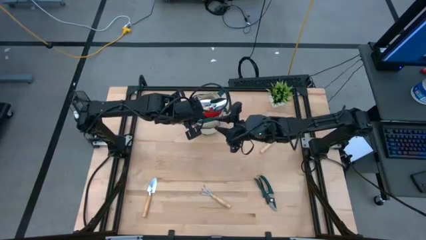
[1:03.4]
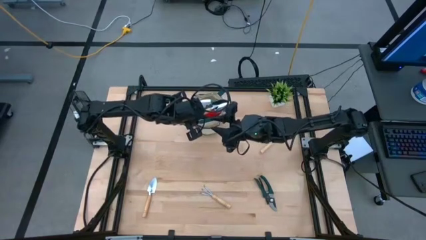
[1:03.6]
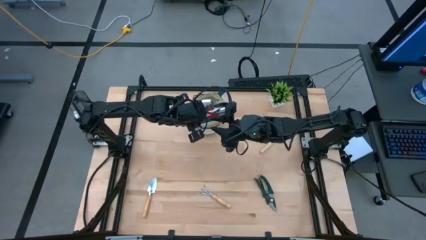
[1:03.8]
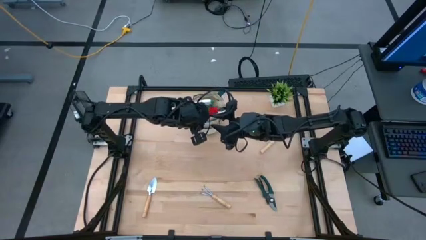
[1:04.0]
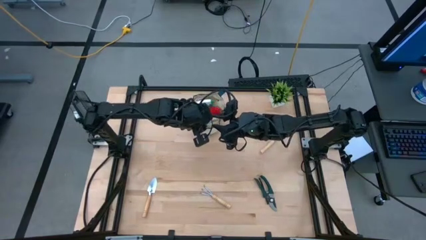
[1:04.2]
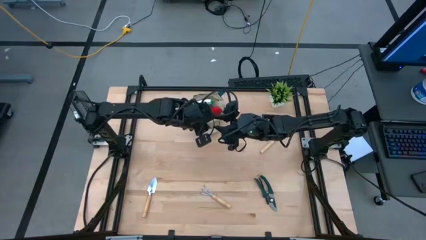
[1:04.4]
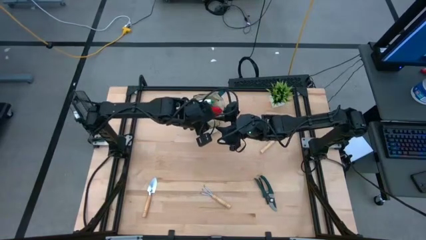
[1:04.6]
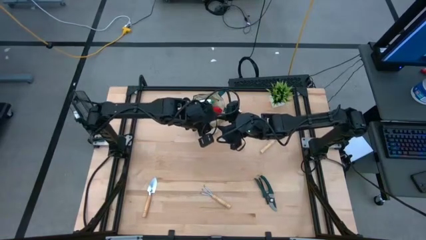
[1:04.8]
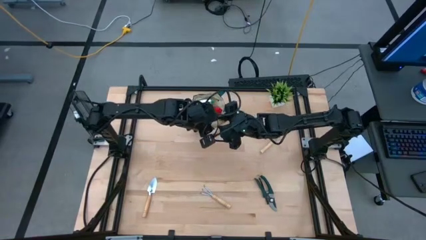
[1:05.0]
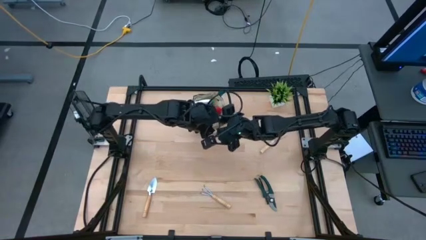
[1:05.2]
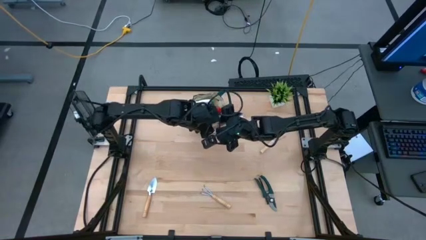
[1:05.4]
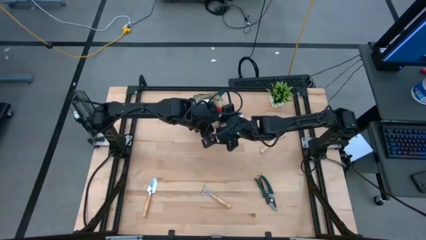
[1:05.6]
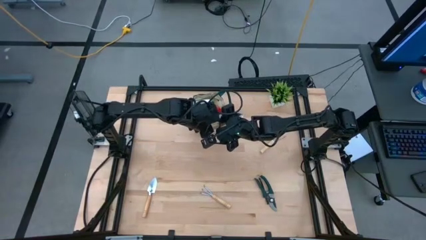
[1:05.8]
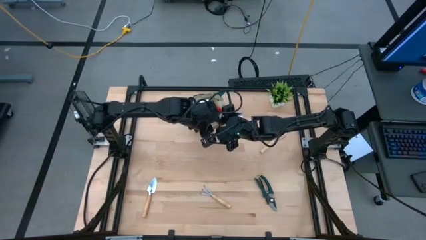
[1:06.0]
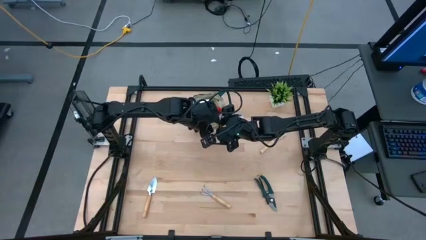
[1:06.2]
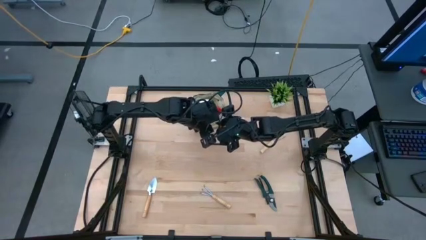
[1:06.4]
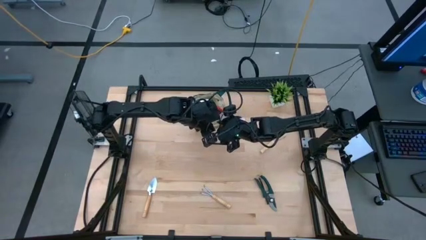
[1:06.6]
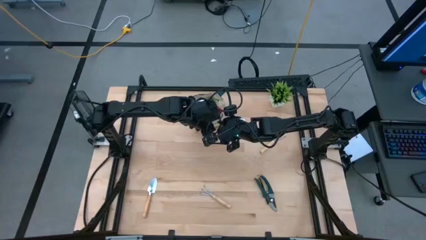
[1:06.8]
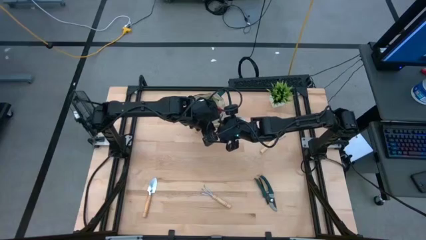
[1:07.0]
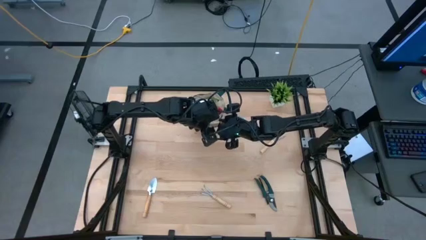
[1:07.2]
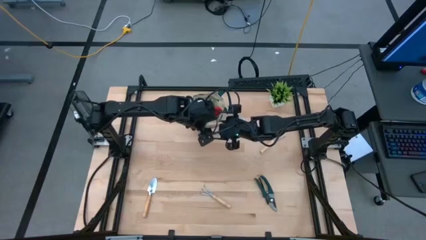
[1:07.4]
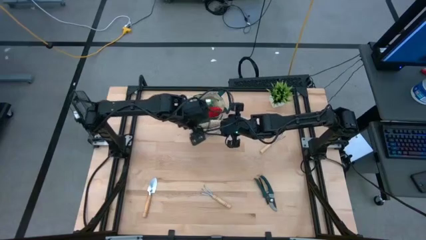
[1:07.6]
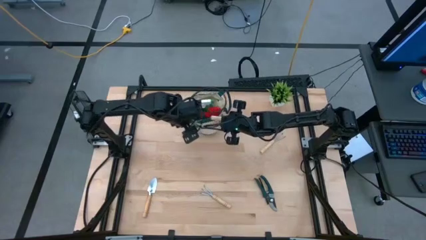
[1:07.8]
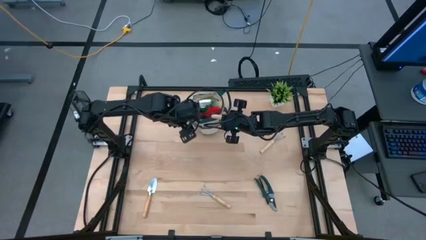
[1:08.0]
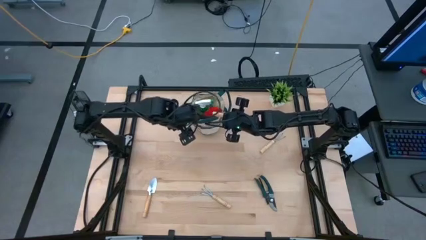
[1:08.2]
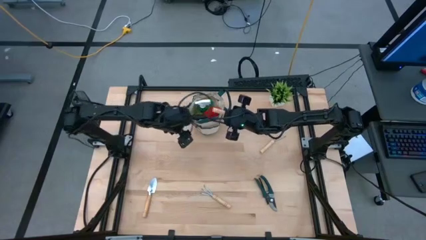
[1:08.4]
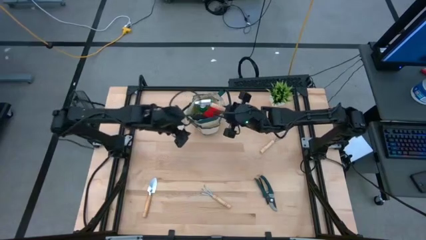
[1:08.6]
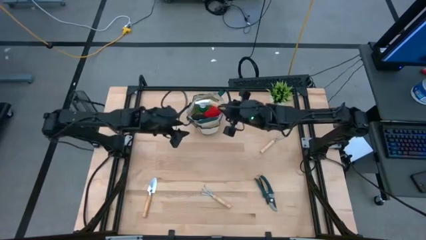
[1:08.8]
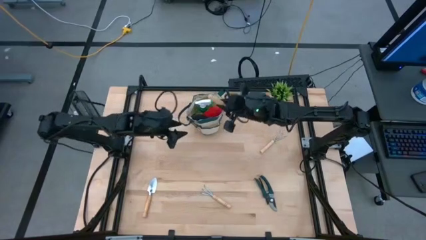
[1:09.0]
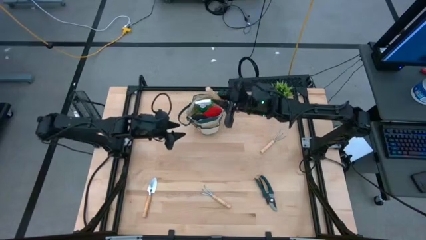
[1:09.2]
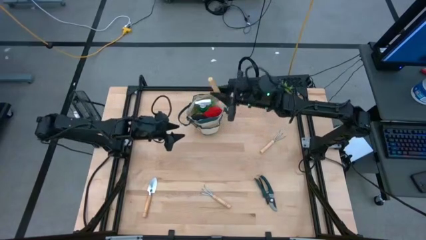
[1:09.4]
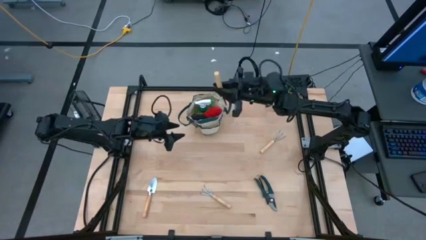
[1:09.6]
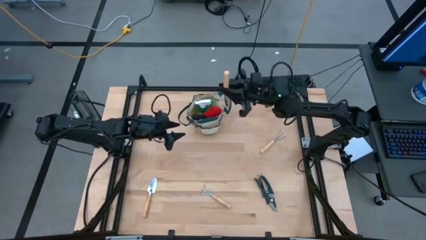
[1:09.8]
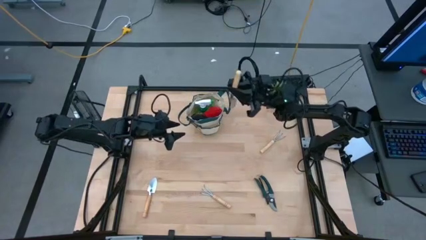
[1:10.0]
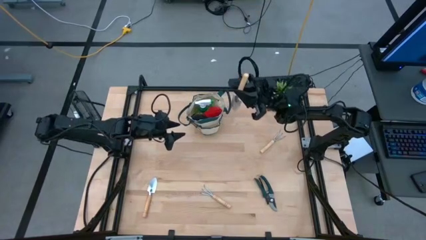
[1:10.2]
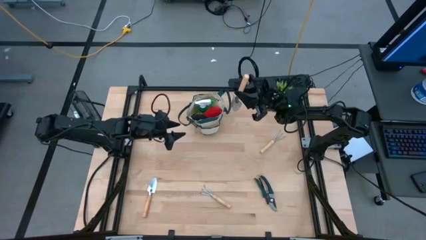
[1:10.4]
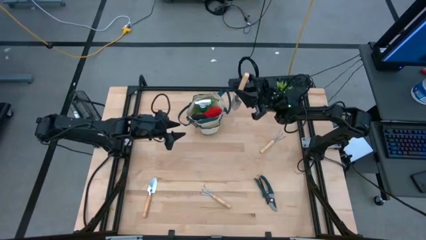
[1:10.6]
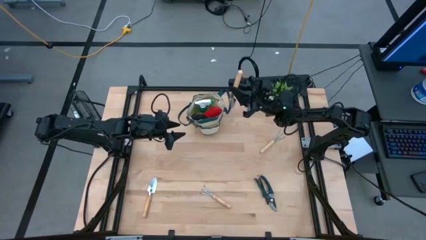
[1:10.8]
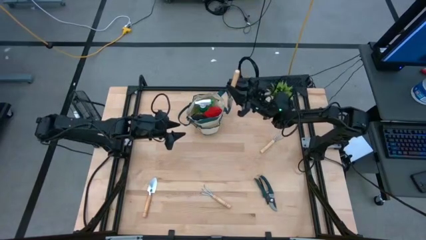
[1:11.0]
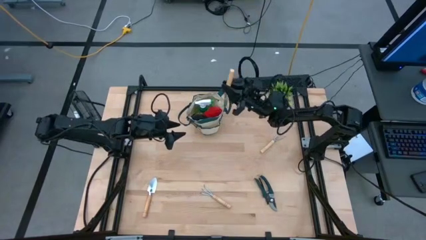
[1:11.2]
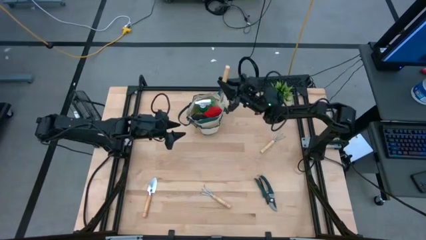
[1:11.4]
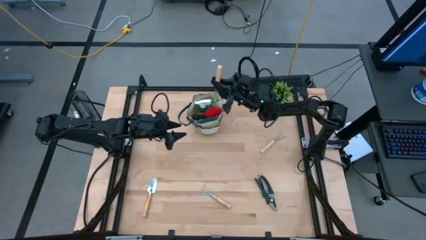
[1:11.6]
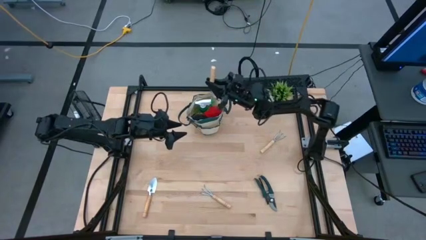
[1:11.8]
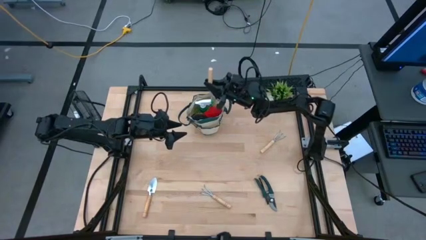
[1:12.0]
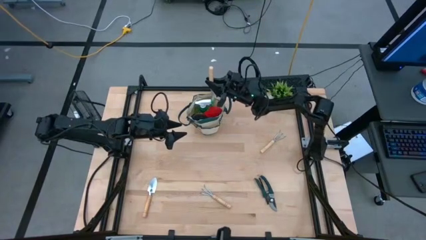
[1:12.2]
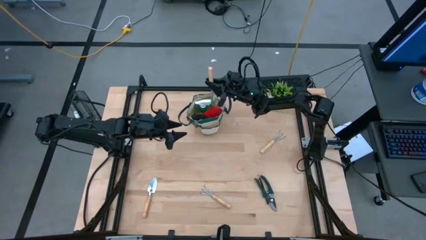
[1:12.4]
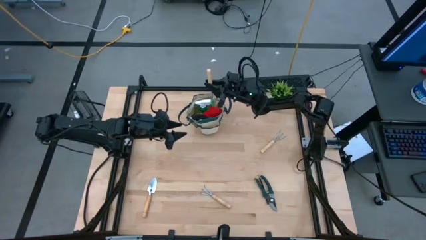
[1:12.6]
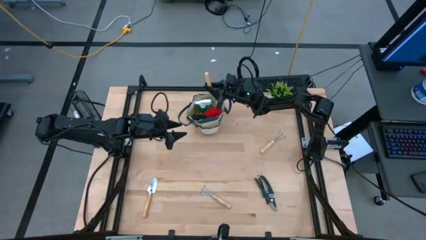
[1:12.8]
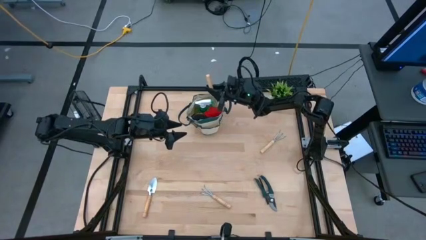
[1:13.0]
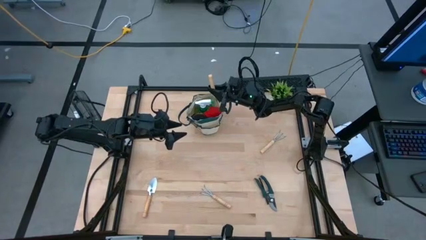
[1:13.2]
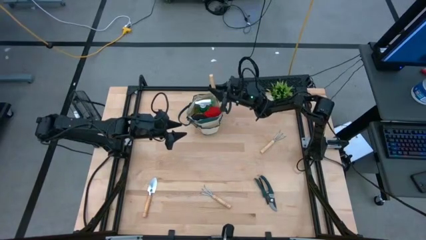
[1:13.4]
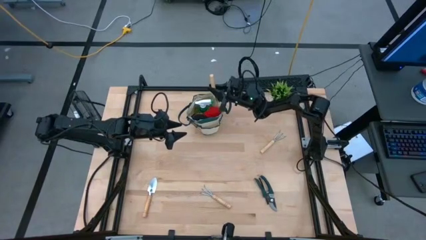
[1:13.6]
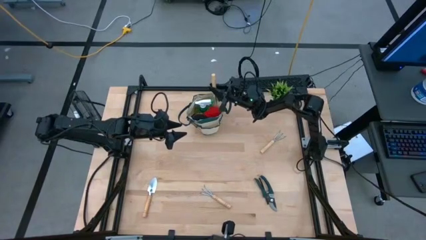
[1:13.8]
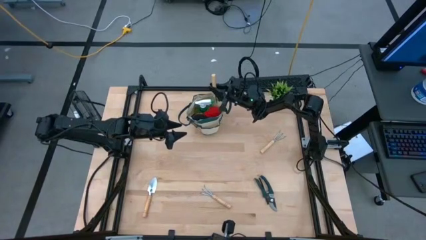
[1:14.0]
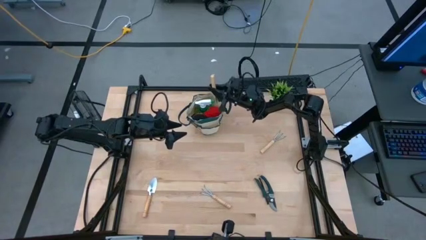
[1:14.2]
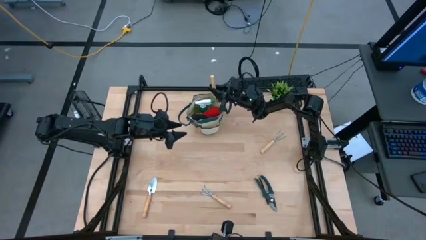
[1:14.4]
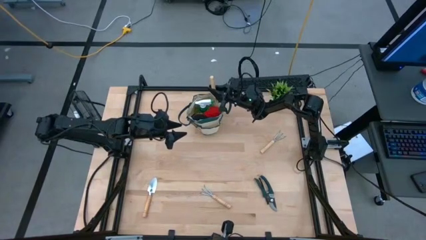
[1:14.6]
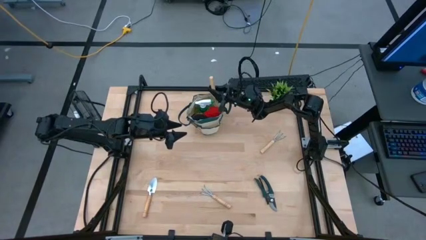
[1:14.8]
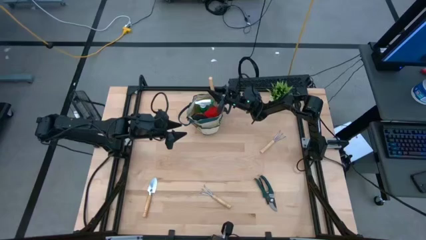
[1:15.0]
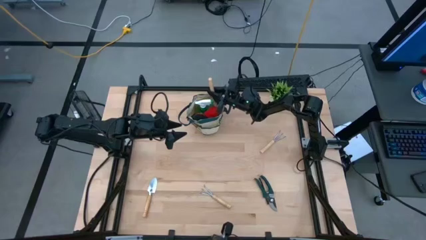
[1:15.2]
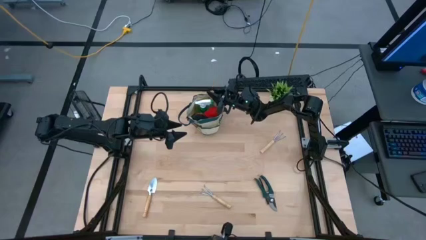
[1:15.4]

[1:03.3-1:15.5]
Task: Pick & Place Garden tools in Gardening bag
Put the top trowel into the gardening bag

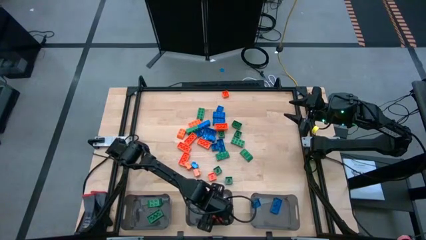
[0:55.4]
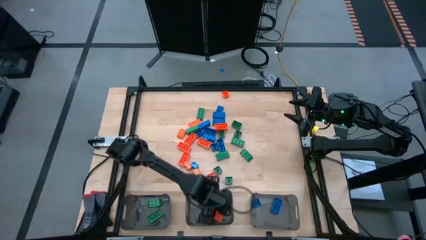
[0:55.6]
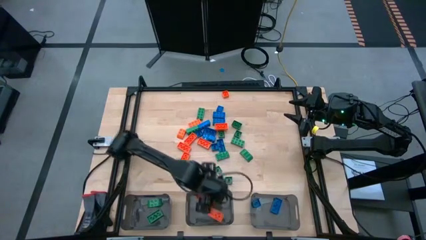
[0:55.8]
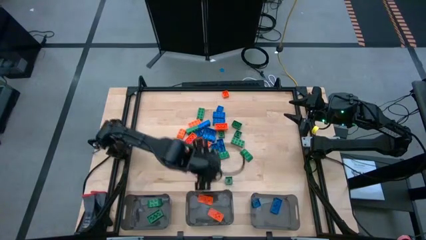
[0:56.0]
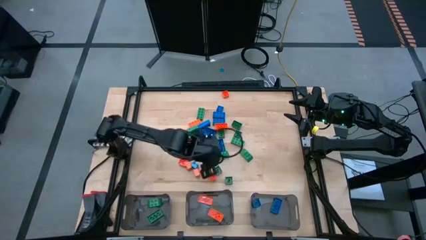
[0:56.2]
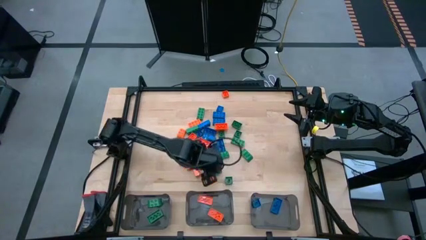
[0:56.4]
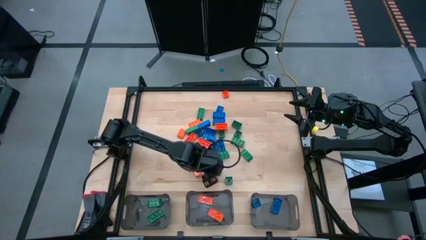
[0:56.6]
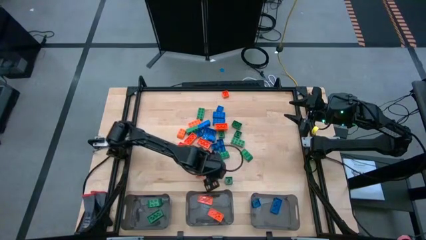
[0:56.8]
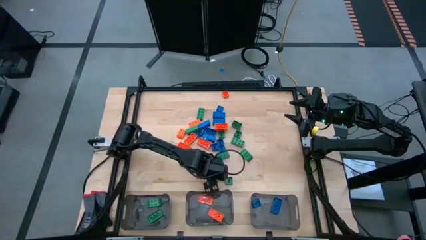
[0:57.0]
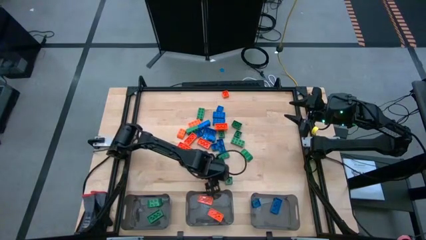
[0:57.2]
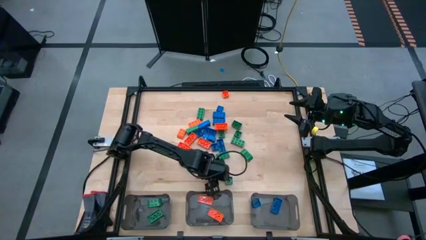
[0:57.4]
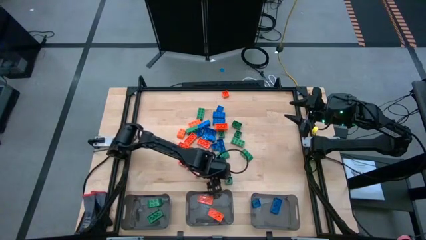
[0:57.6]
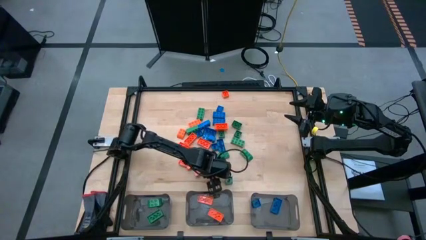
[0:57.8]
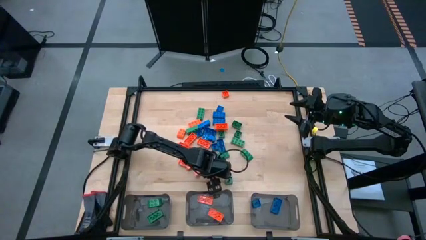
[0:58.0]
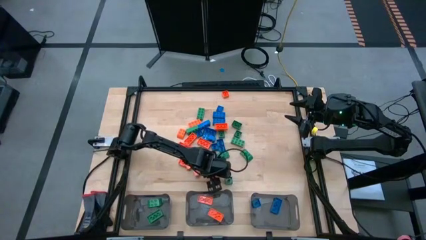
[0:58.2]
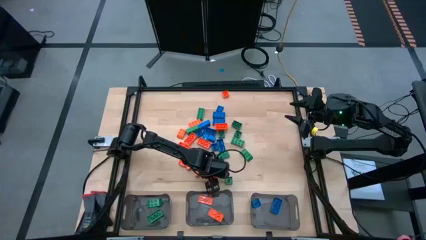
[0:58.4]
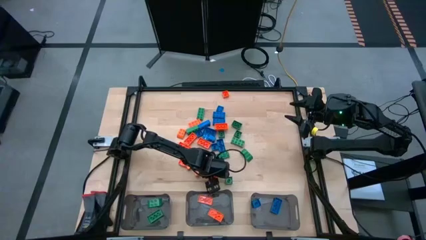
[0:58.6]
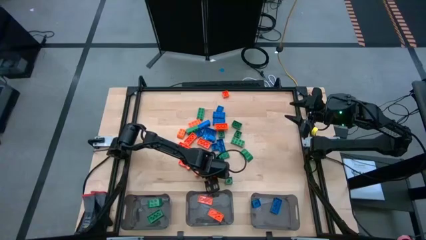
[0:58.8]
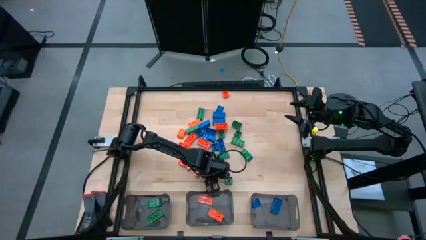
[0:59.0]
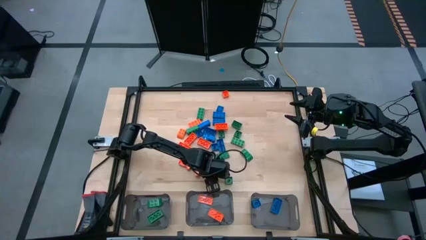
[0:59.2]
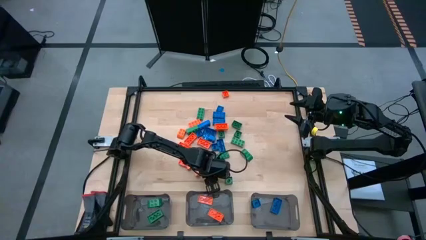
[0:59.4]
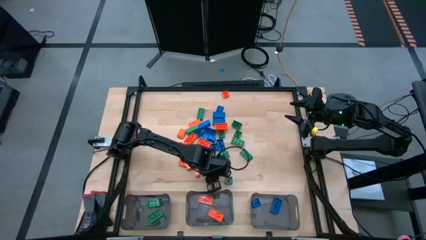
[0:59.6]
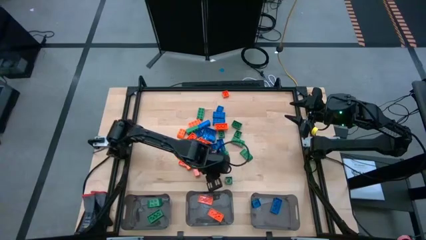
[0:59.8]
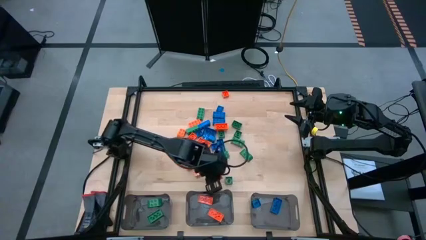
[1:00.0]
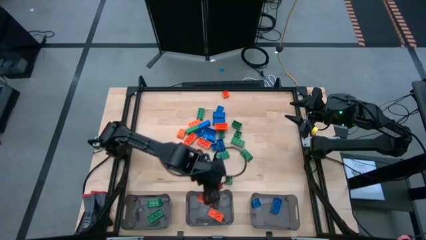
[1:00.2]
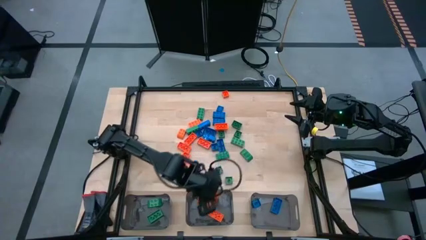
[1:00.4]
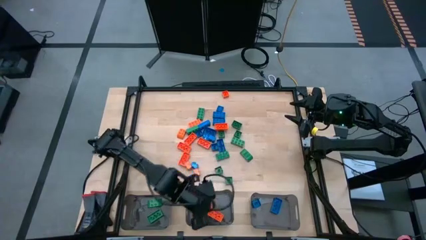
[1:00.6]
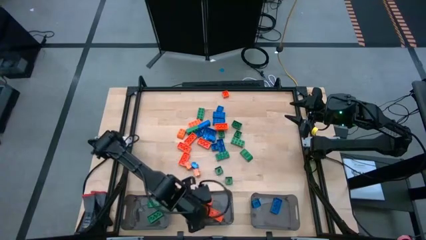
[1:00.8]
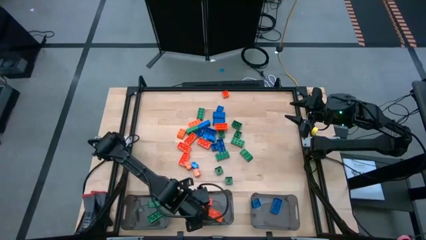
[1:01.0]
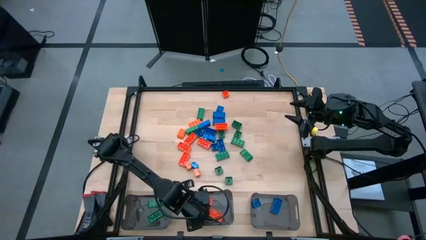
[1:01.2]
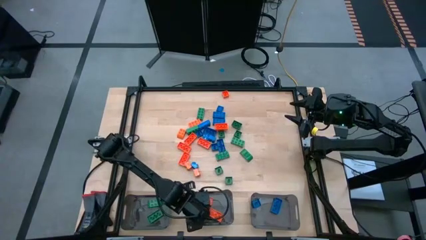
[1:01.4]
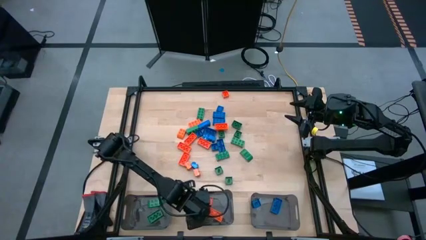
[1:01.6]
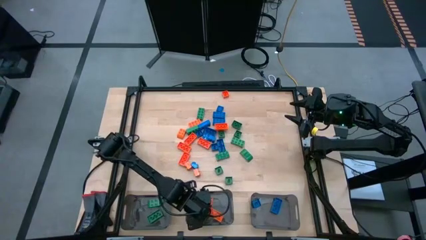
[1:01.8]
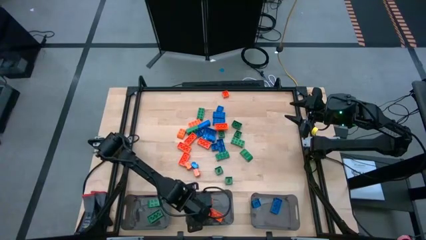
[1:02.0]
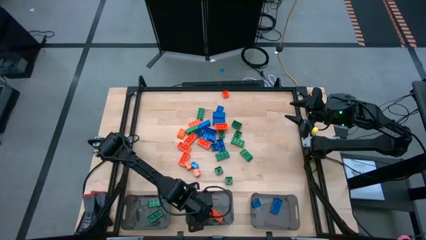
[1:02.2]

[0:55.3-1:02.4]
Task: Sort blocks
Put the orange game piece into the middle black bin
